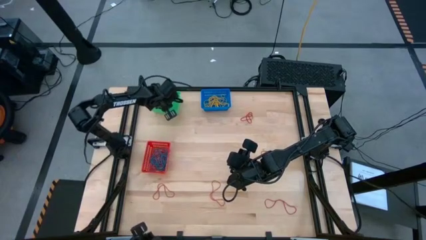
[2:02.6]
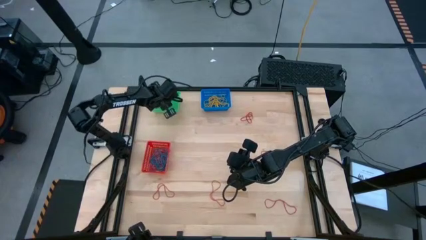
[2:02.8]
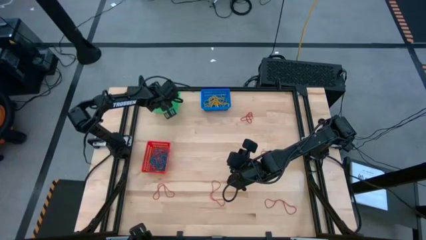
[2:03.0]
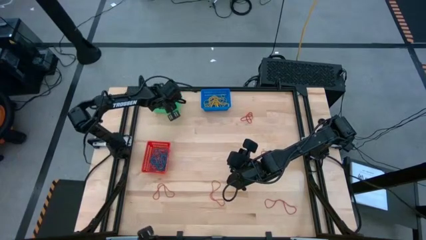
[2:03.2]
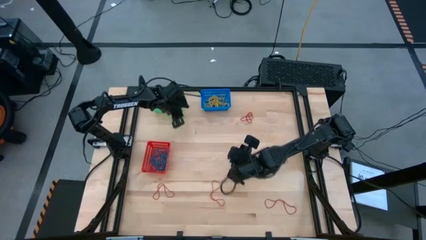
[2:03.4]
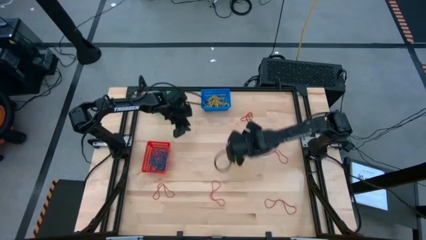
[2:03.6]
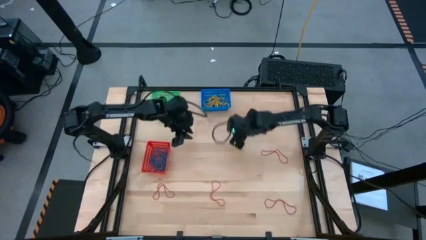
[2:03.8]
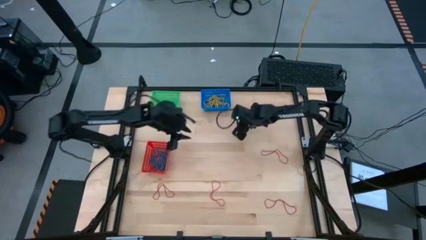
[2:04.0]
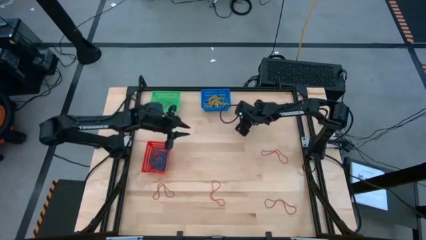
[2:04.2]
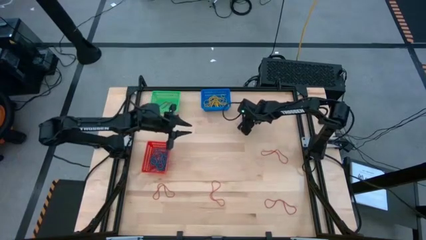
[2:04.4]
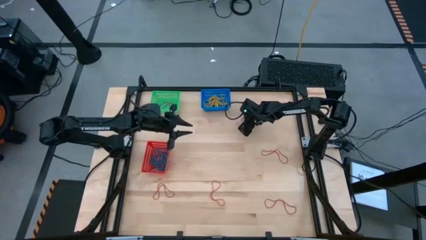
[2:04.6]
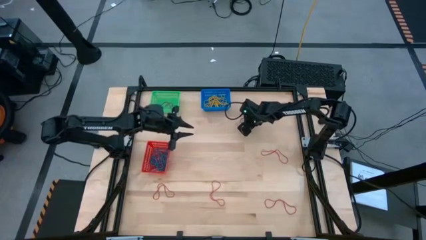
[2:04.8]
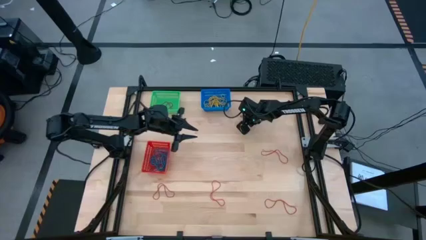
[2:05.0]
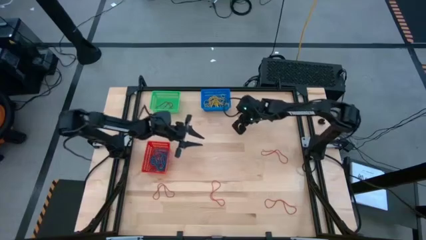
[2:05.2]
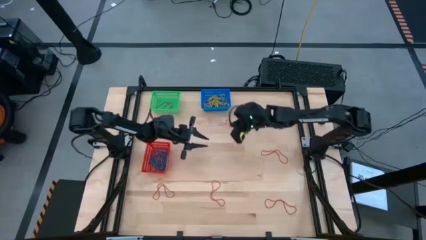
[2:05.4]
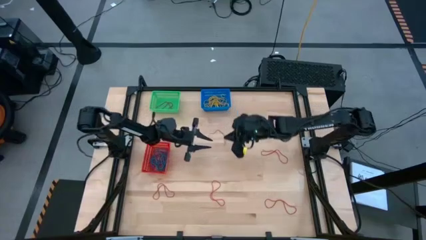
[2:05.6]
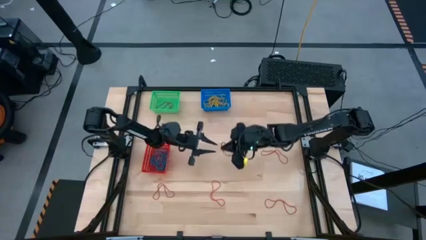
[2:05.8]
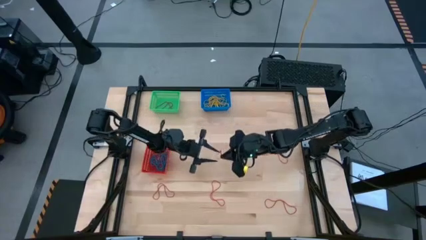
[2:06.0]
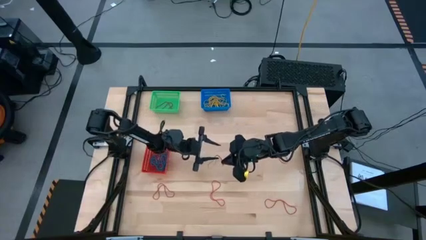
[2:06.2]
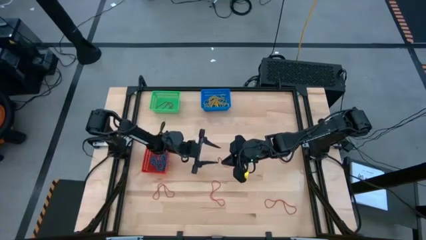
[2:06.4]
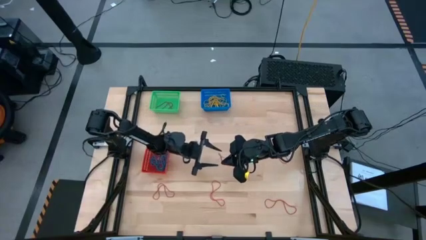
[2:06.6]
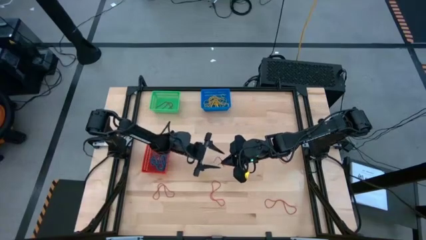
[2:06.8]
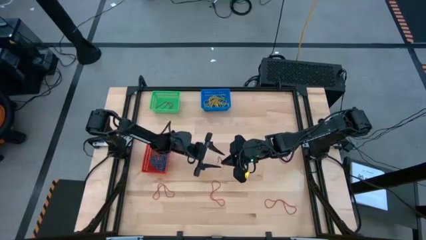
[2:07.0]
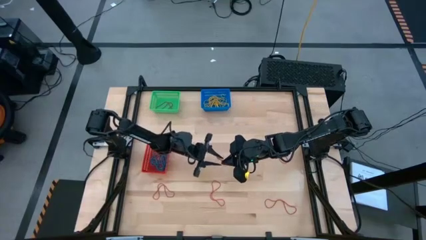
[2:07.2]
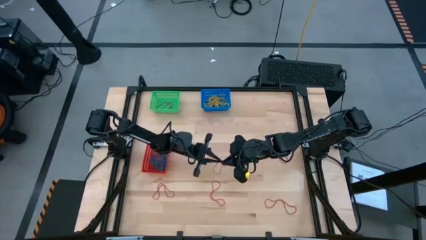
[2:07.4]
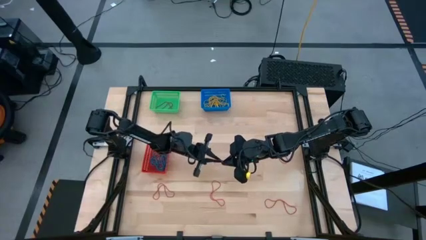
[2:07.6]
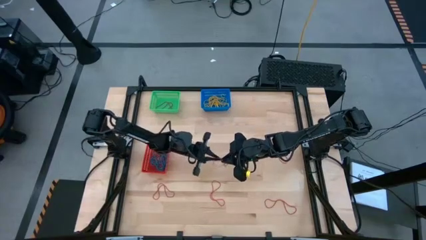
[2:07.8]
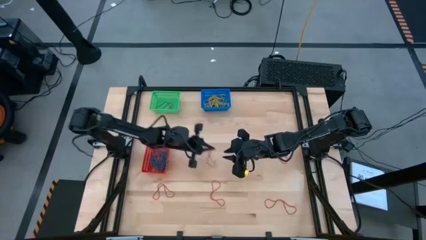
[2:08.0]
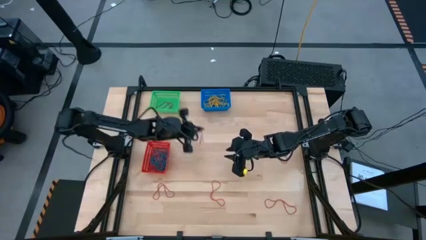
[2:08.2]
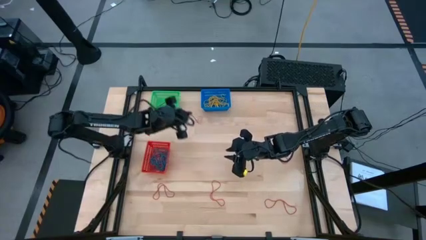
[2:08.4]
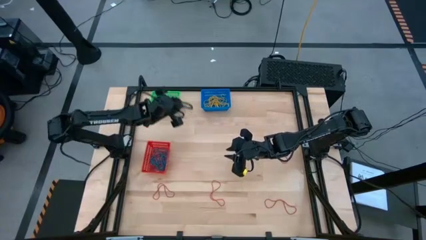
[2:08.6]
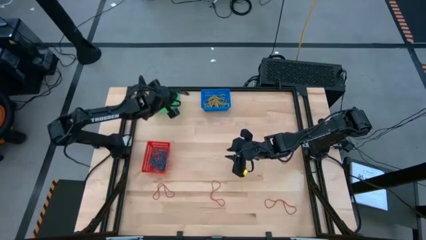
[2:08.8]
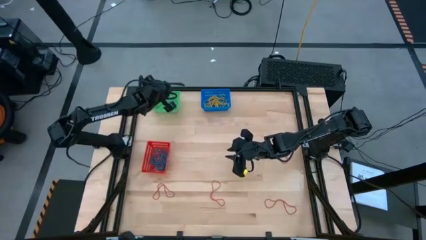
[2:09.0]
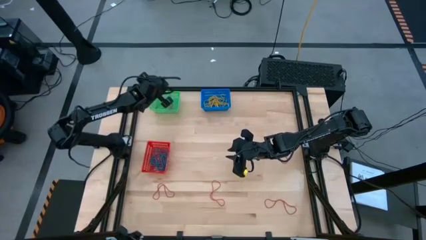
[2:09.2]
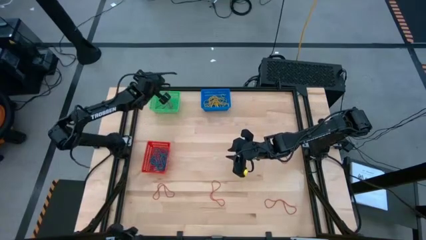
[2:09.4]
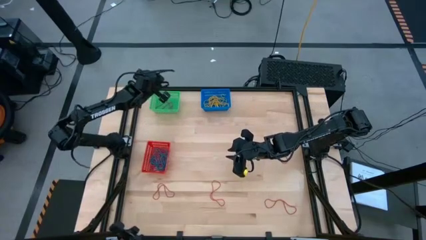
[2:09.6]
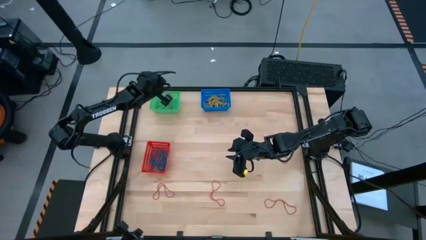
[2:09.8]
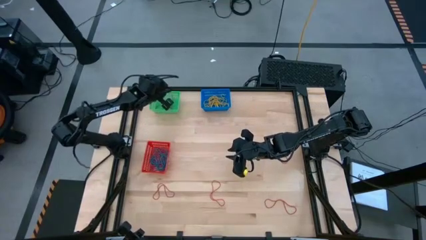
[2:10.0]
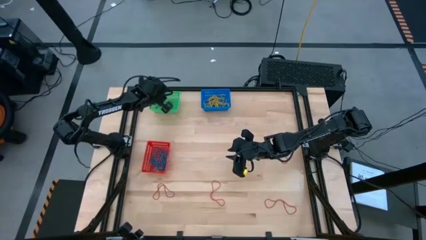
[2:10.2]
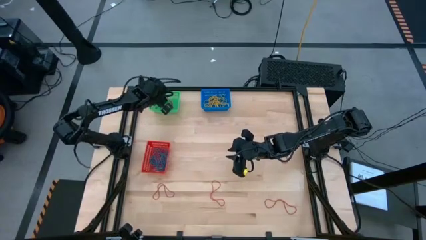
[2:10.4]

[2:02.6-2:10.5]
Task: Sort rubber bands into baskets
Put the red rubber band into the green bin

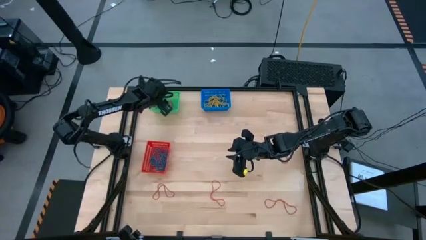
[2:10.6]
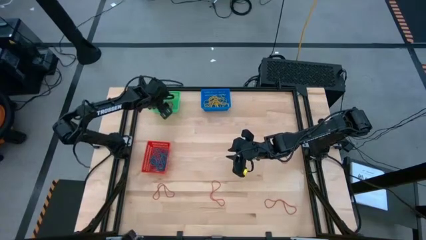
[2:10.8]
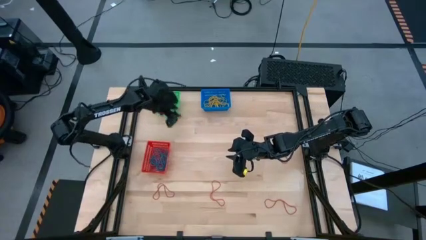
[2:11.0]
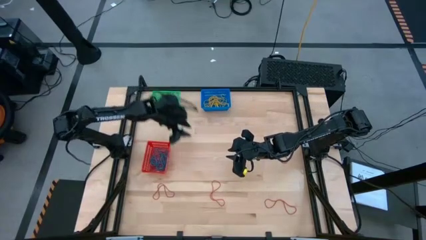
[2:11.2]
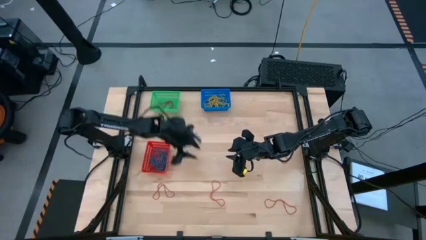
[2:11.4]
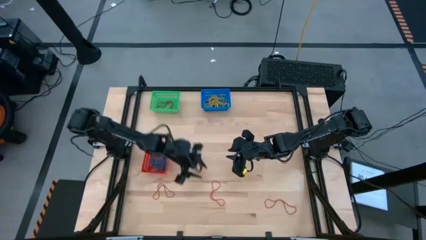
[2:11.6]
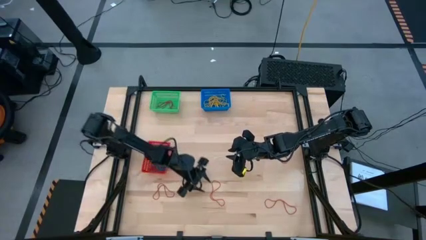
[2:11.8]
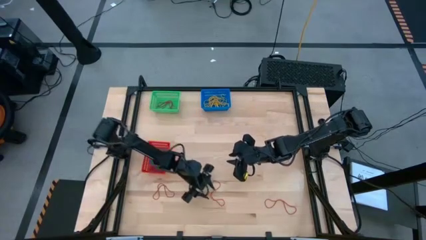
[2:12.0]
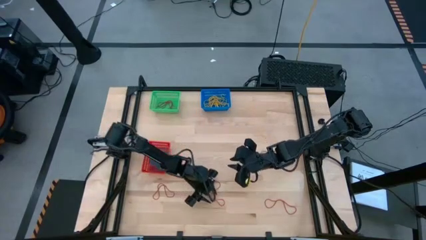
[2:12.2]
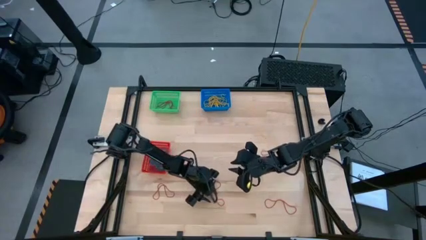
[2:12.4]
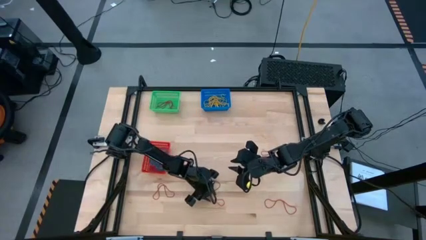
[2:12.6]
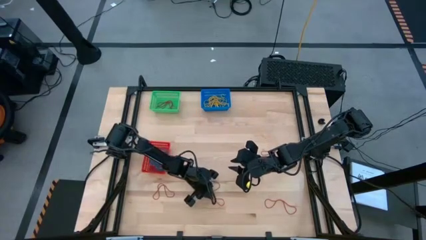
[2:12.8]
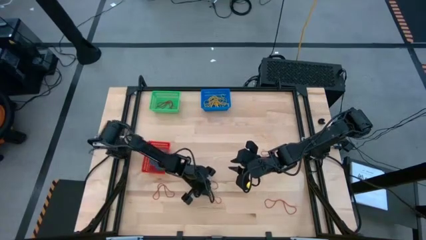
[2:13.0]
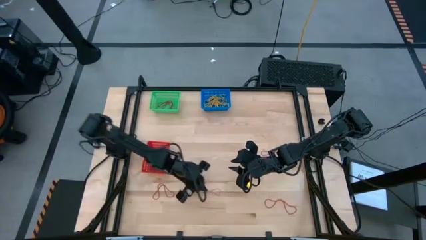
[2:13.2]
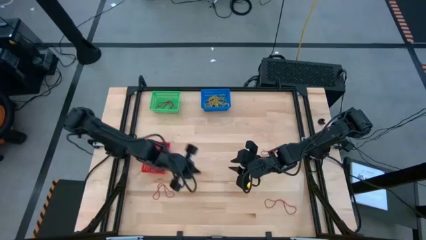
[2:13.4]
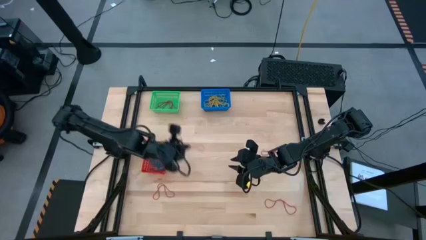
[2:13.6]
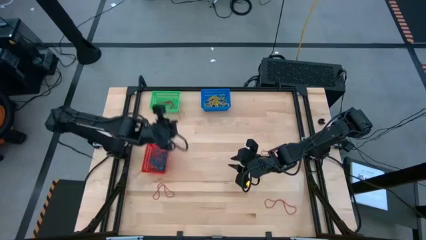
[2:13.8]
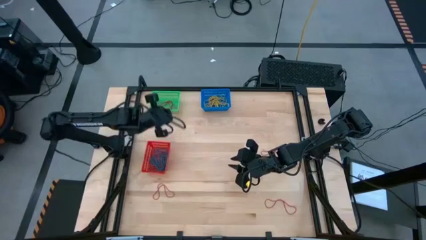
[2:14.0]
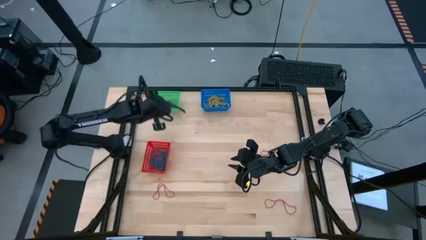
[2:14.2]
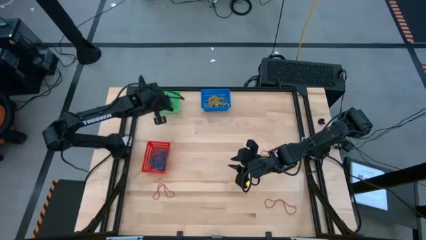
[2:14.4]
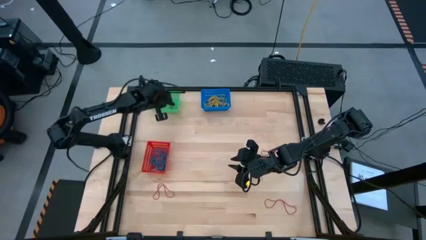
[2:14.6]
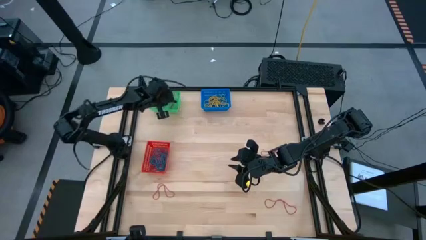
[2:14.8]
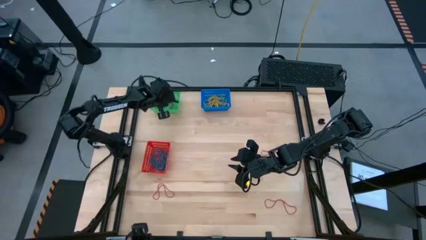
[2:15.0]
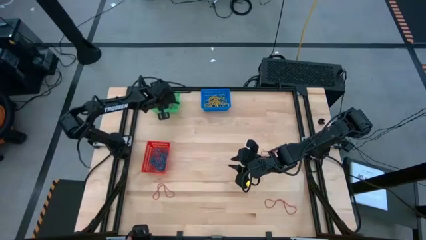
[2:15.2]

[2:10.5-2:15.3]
Put the red rubber band into the green bin

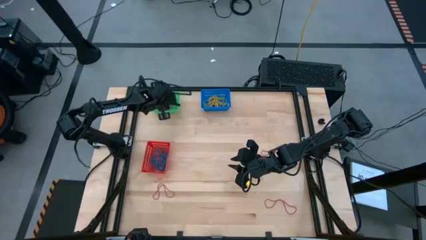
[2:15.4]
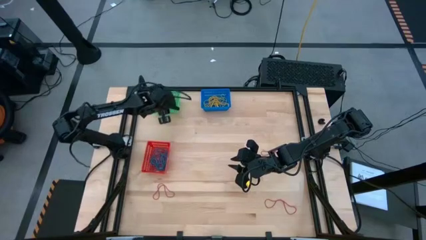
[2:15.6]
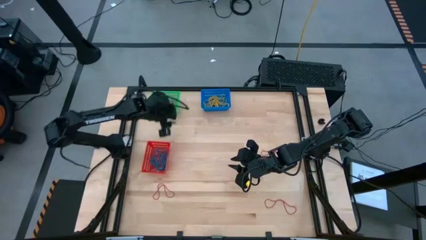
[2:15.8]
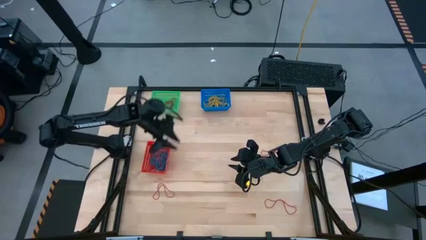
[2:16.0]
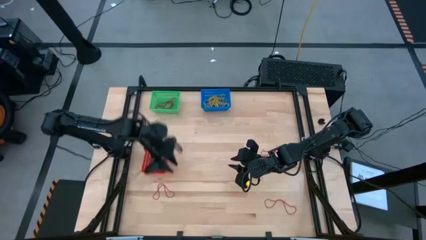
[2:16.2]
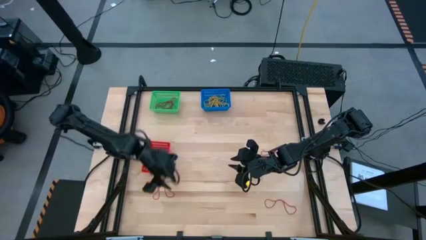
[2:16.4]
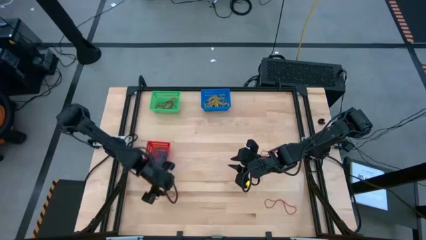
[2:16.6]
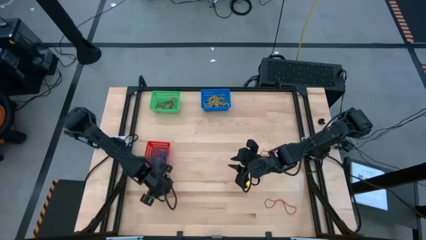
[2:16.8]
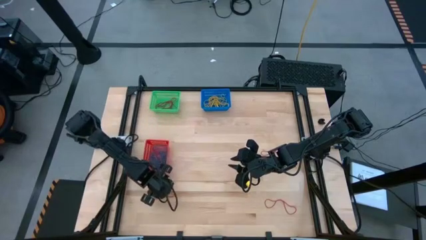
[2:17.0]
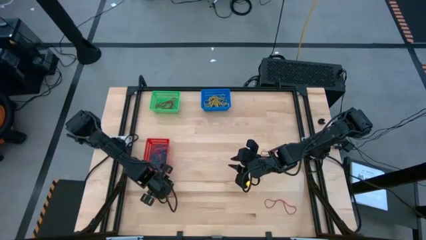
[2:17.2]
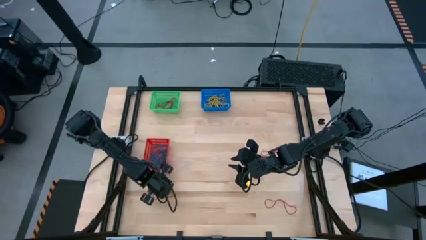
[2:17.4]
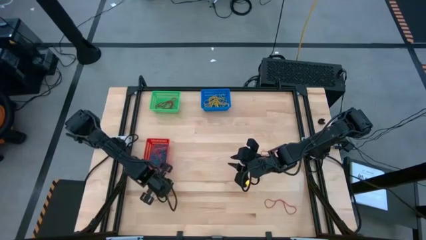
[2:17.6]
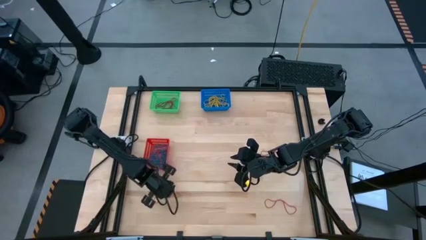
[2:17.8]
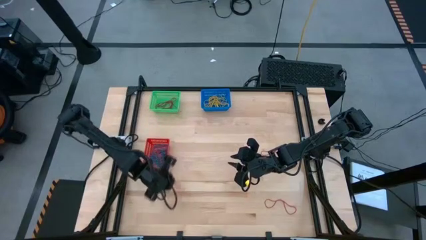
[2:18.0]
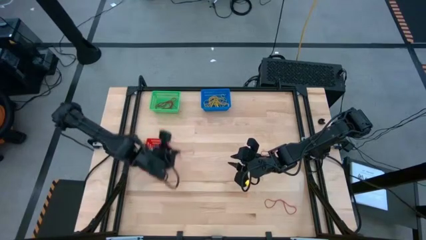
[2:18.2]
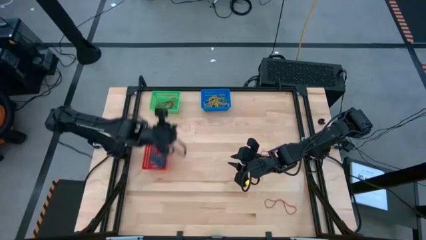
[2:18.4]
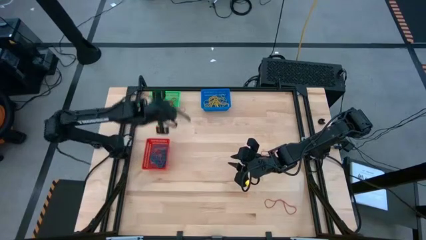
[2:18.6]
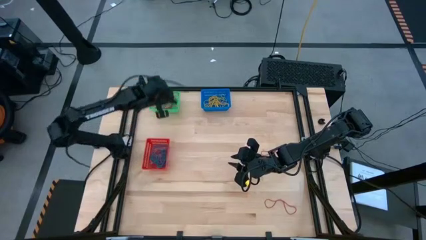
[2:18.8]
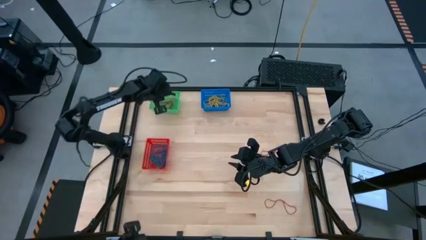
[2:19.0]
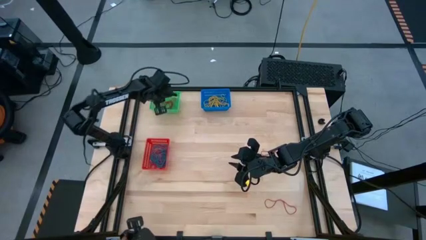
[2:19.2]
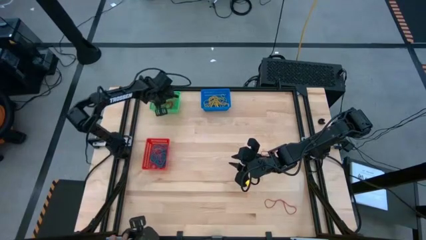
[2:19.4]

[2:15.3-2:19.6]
Put the red rubber band into the green bin
